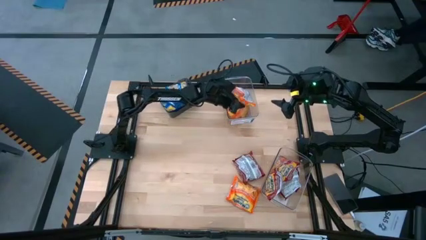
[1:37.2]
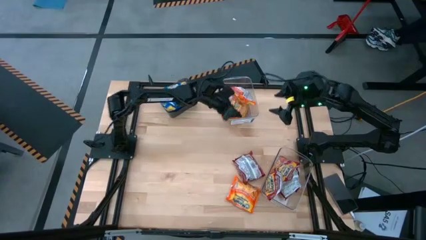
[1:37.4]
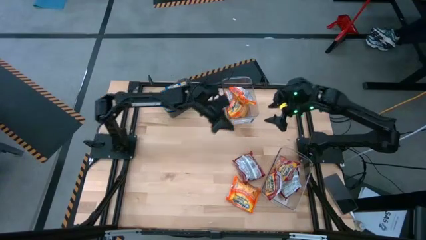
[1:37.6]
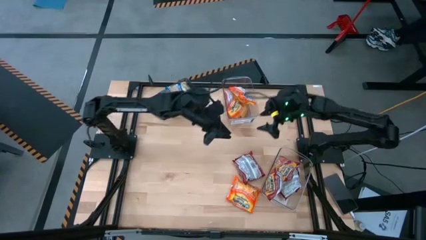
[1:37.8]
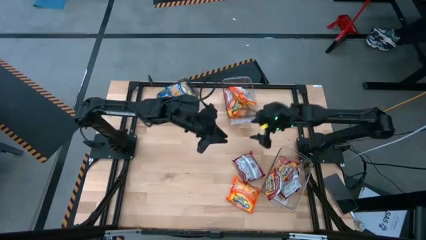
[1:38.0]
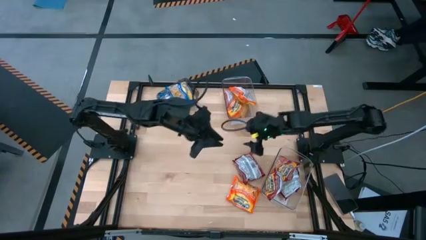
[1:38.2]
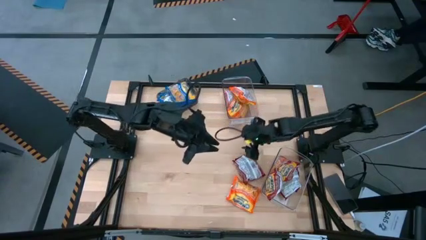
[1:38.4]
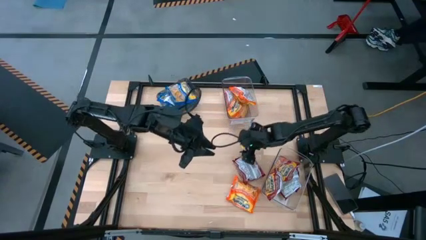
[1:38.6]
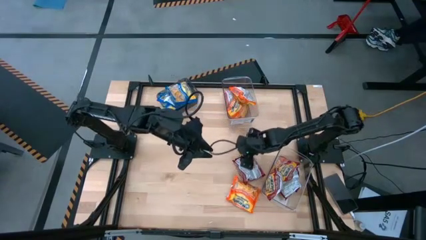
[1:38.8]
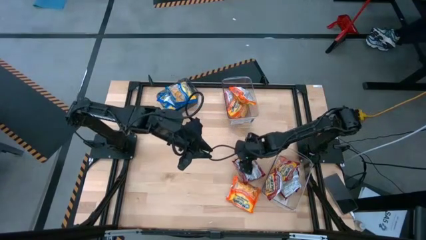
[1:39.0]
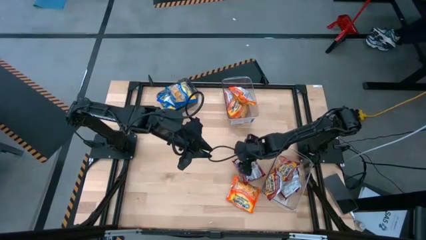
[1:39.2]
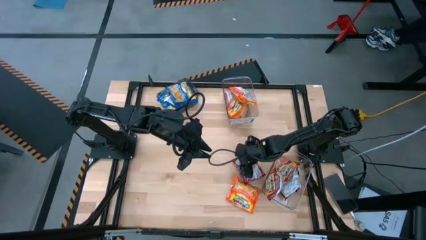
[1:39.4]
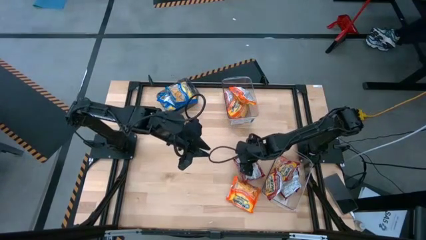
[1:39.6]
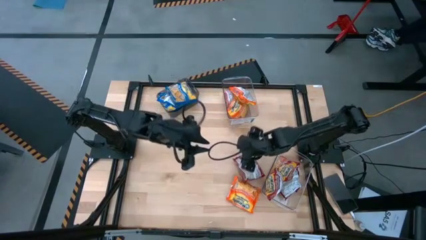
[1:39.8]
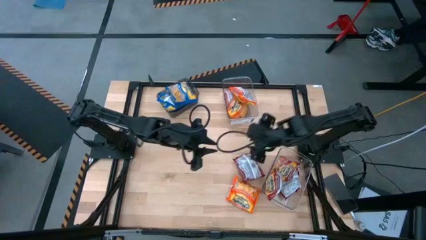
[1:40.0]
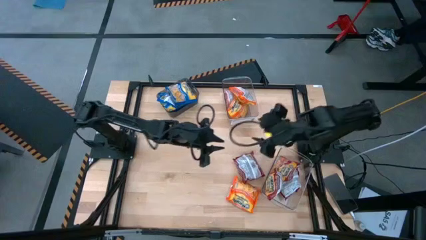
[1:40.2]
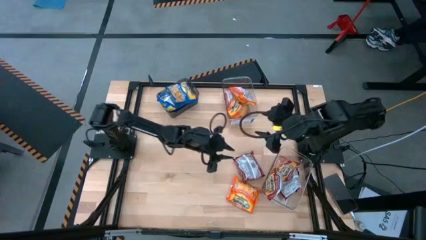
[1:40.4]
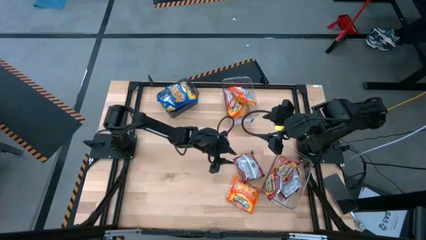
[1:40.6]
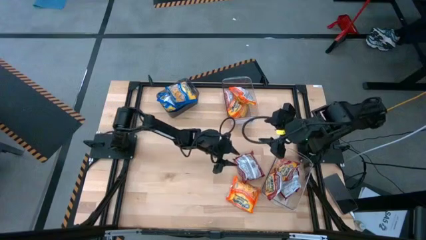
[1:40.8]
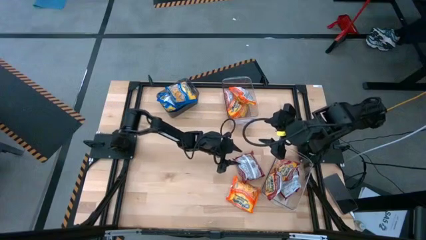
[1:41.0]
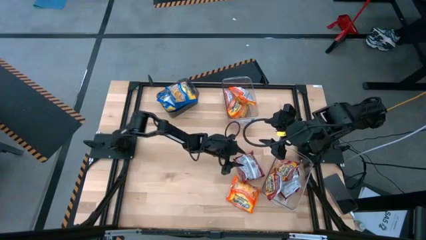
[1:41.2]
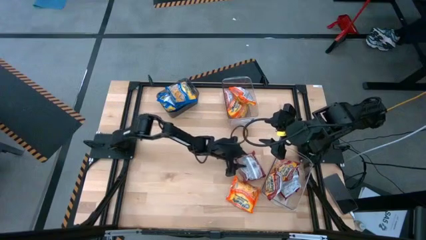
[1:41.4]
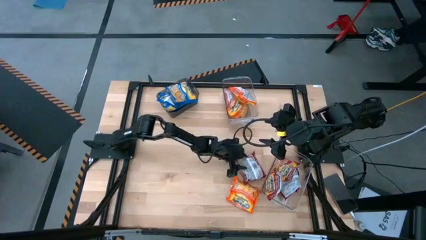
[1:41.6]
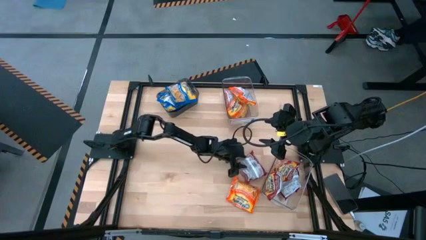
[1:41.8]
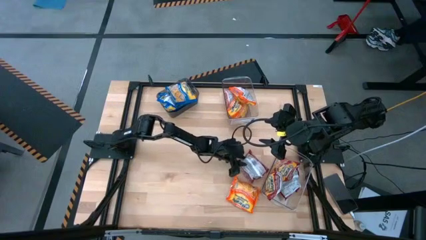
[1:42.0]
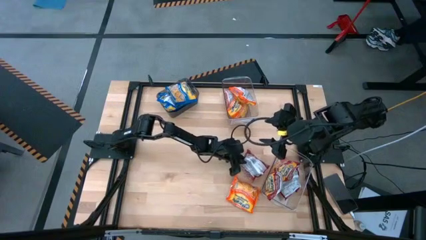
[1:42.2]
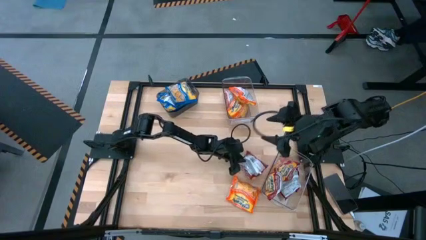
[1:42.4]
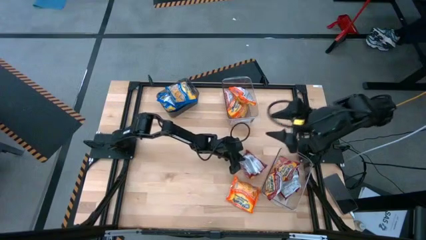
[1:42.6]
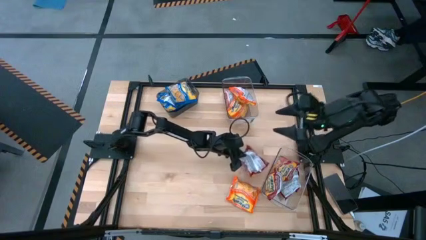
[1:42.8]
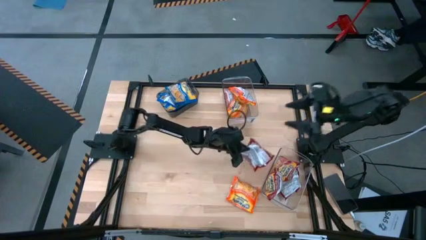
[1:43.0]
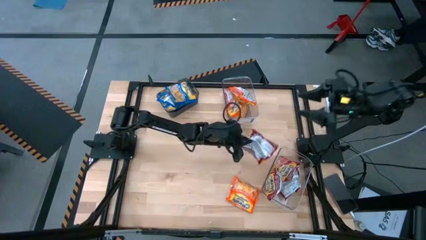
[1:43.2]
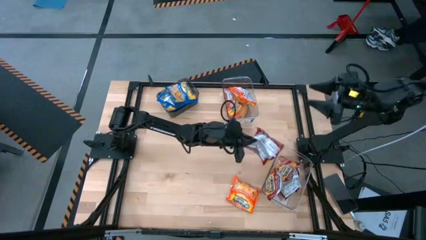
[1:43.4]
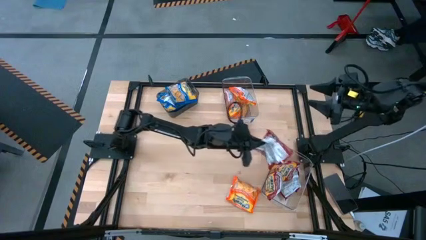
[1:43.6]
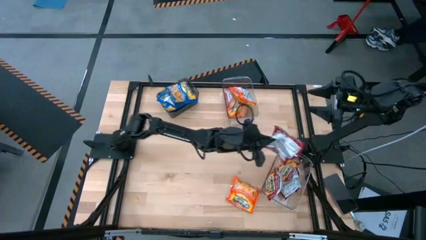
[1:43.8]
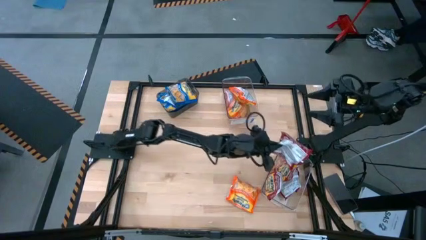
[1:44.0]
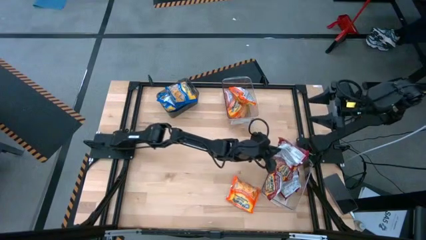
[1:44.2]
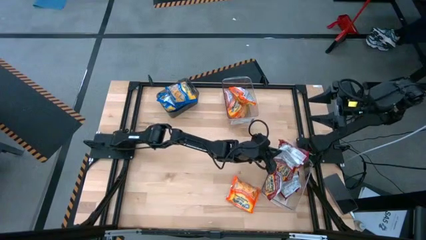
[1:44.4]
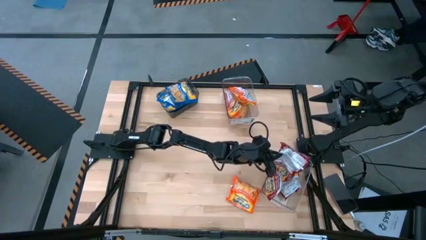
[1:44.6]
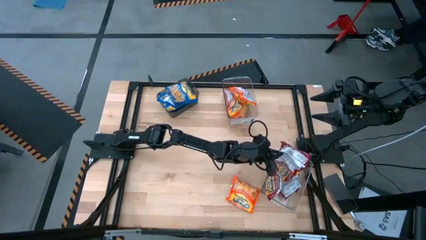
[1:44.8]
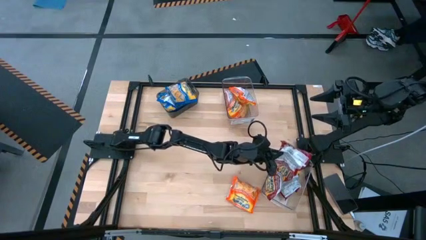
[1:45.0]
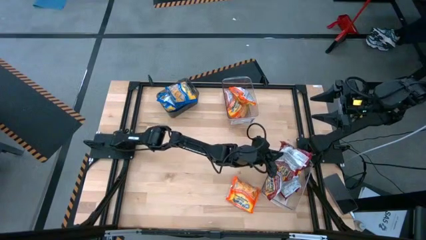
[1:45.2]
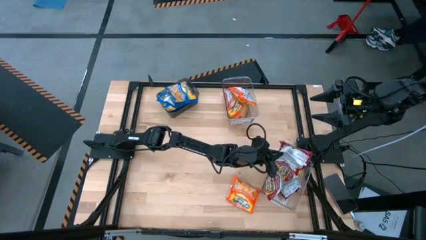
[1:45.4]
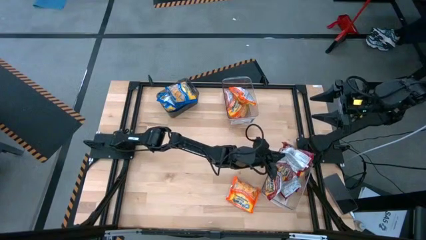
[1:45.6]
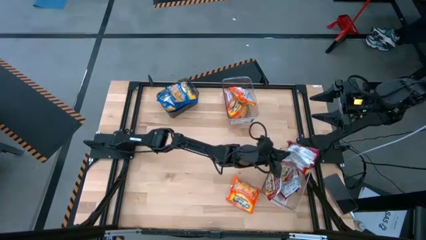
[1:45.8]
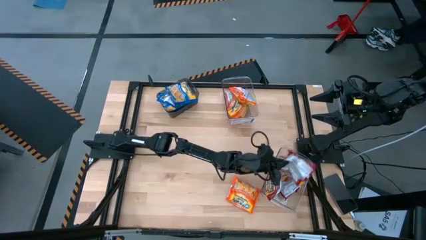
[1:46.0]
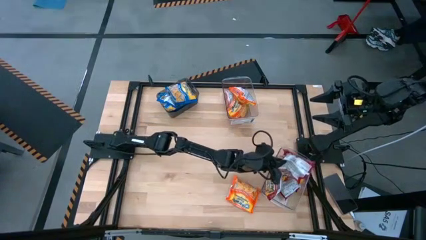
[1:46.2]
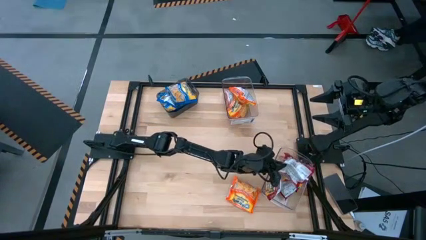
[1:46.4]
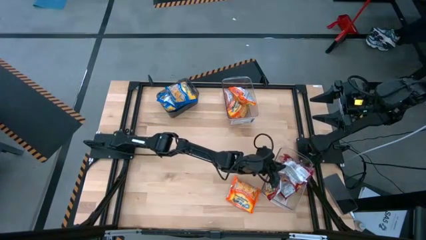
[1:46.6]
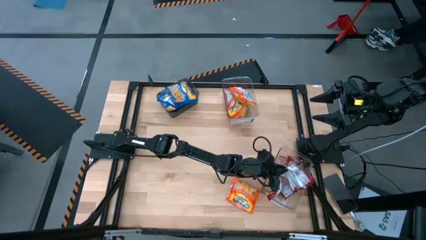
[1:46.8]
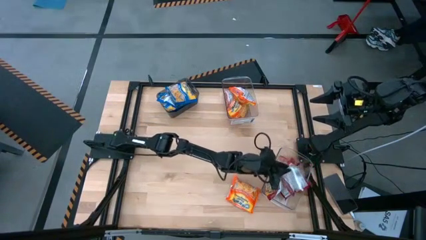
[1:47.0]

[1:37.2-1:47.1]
Task: Sort Maruchan noodles
Put the red noodle pack into the bottom transparent bin

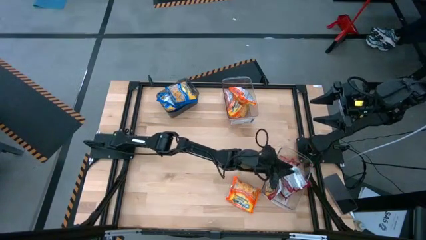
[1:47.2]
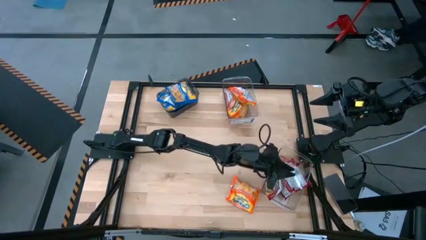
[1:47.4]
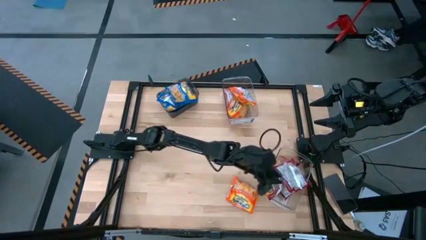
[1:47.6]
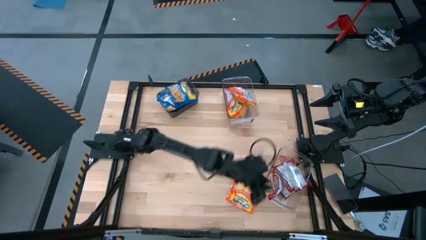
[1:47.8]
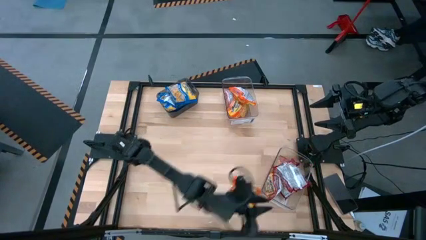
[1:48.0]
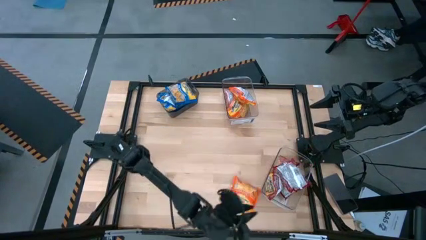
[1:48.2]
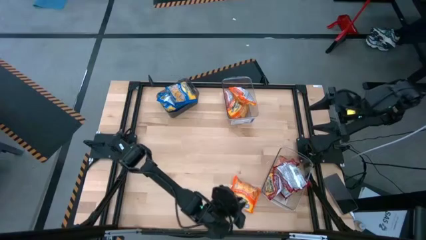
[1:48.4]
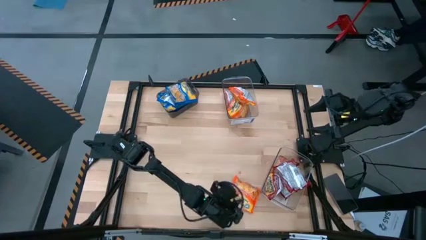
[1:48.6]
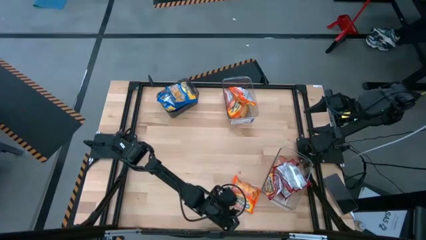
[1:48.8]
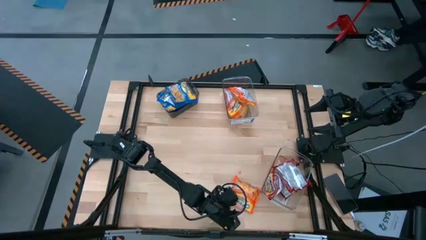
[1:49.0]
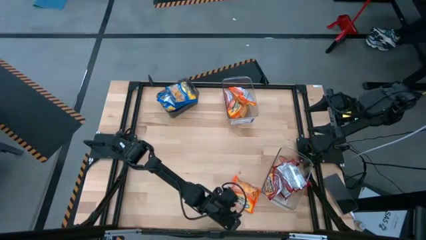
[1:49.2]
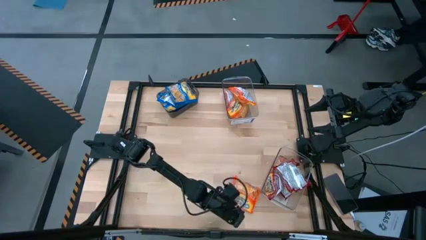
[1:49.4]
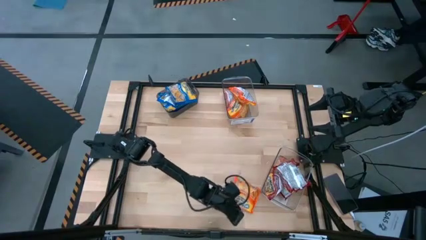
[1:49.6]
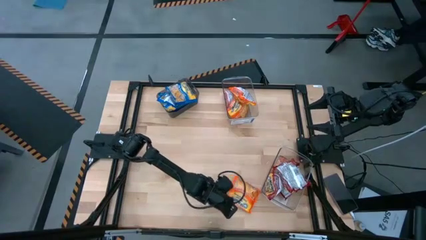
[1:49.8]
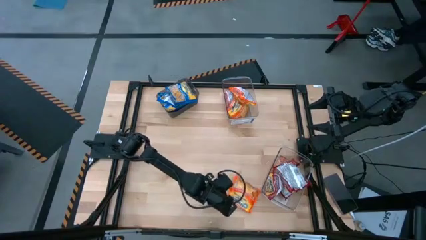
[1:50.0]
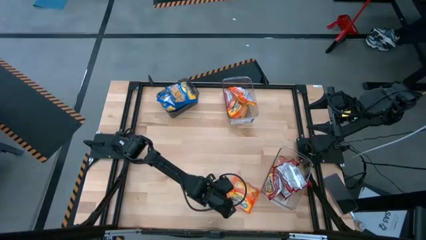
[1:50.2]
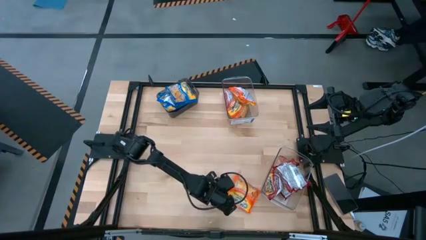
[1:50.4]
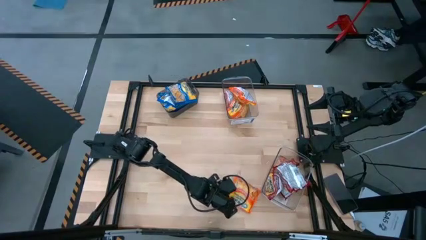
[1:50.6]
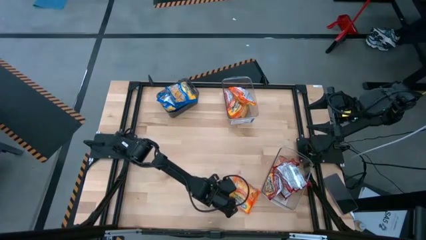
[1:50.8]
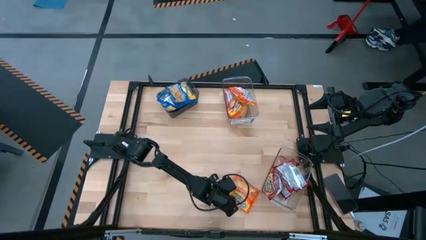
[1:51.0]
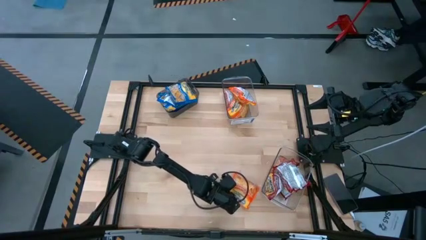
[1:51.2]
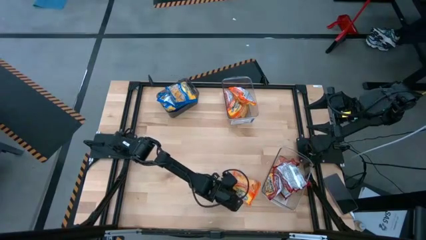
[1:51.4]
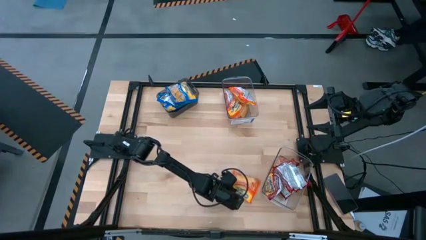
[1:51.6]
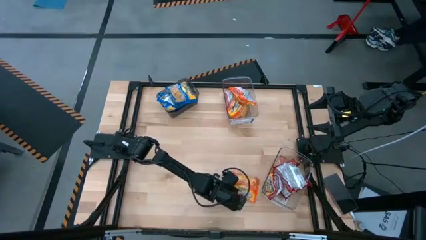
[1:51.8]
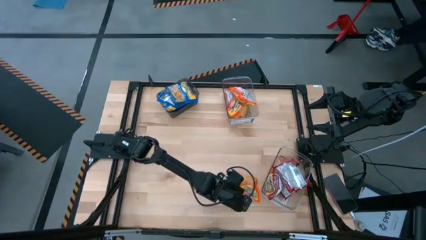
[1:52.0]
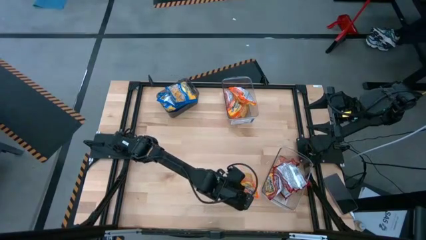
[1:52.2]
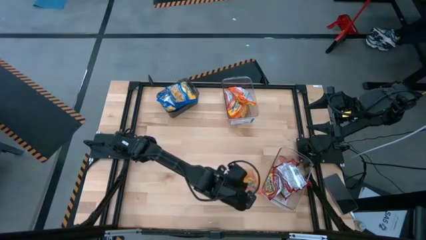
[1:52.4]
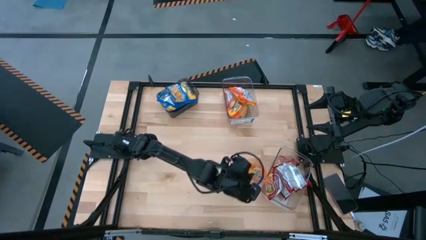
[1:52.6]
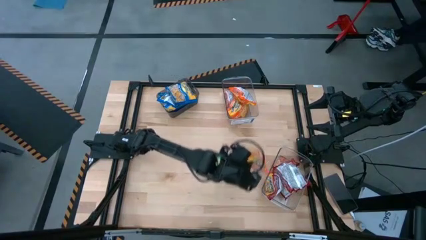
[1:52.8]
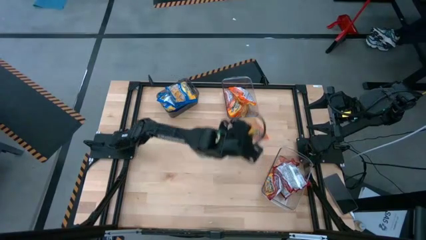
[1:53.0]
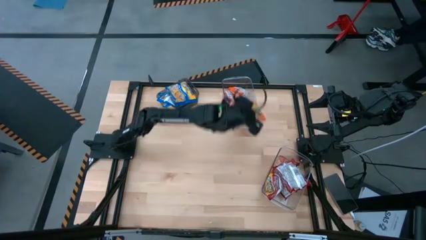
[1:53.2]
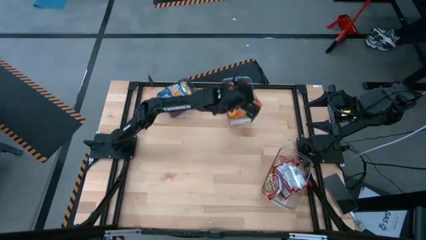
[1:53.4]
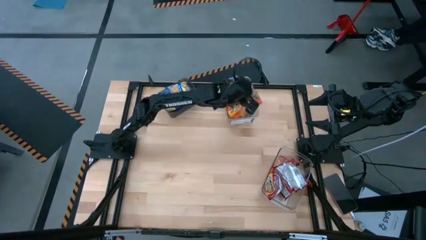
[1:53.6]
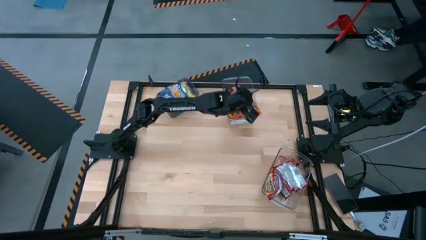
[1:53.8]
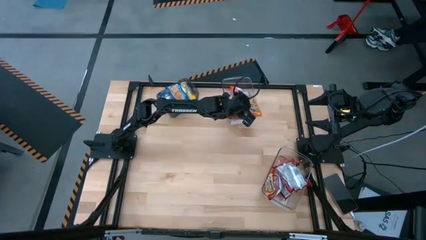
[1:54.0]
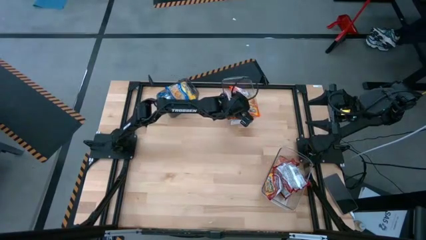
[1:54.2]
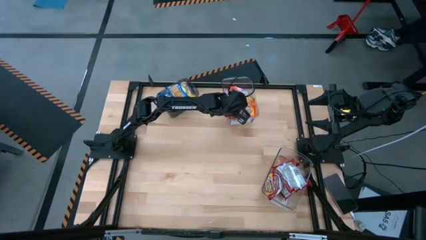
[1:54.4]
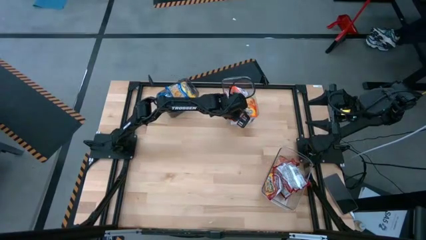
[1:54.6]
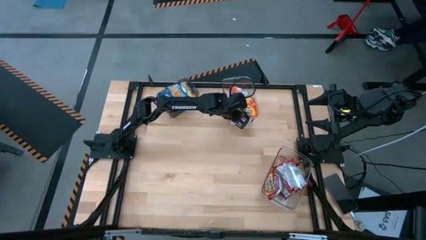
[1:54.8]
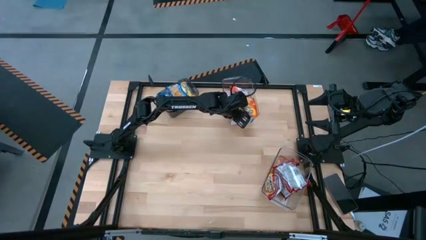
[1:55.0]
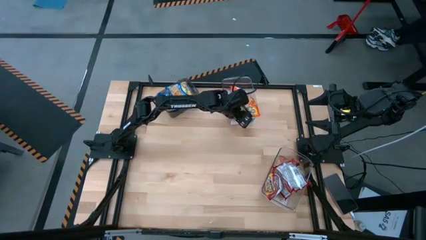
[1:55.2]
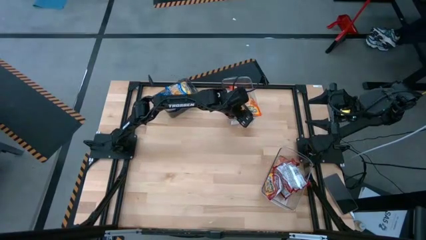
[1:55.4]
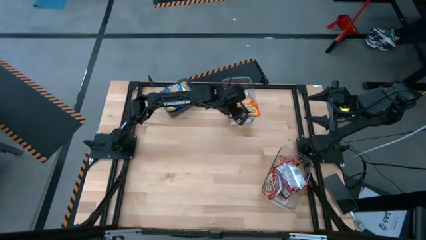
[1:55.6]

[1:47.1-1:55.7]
Put the orange noodle pack into the top transparent bin
